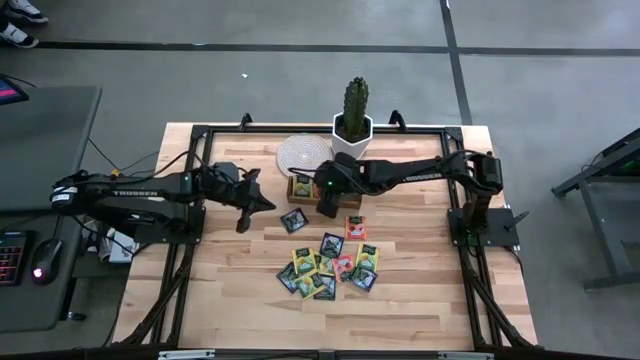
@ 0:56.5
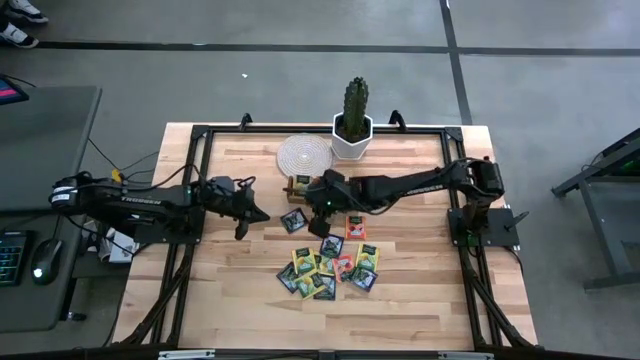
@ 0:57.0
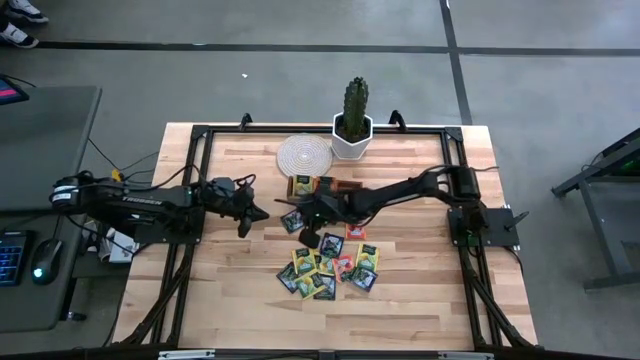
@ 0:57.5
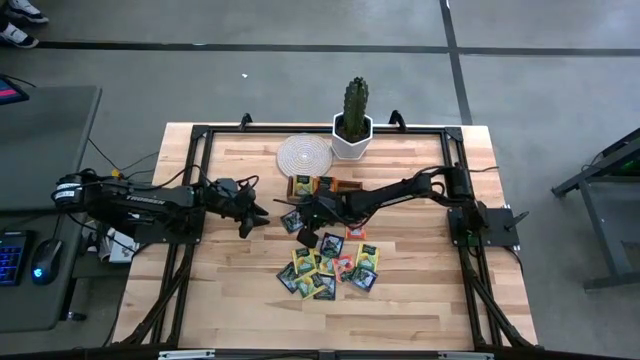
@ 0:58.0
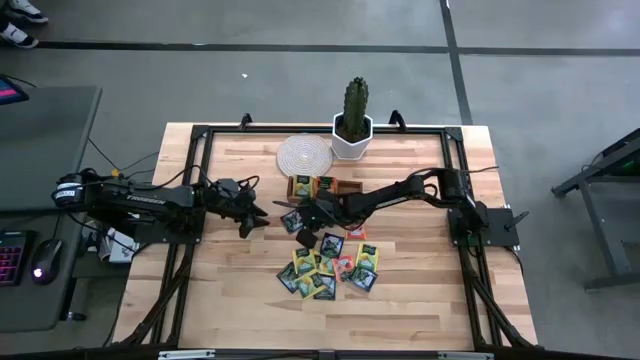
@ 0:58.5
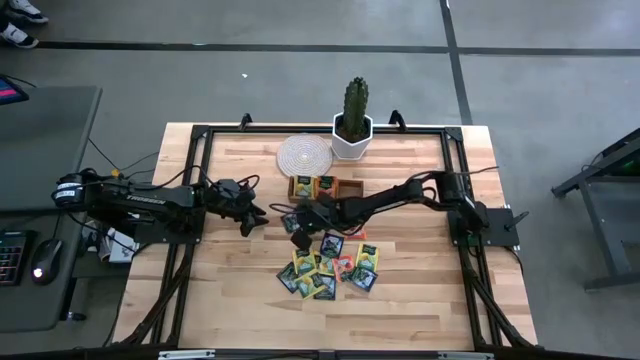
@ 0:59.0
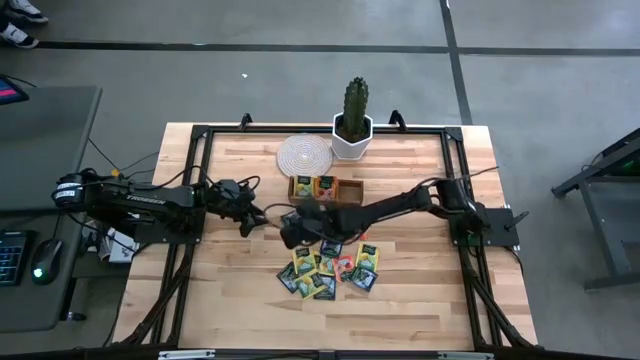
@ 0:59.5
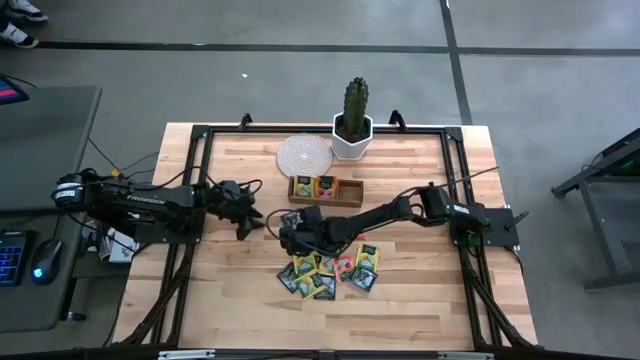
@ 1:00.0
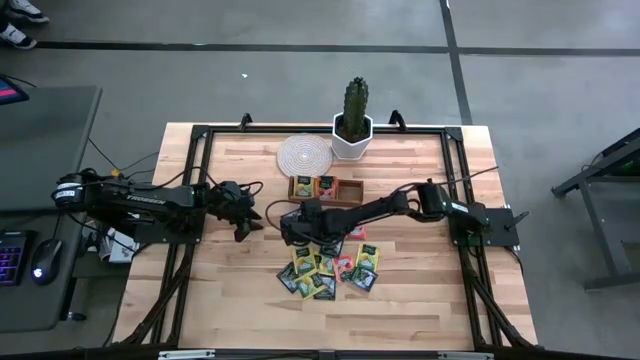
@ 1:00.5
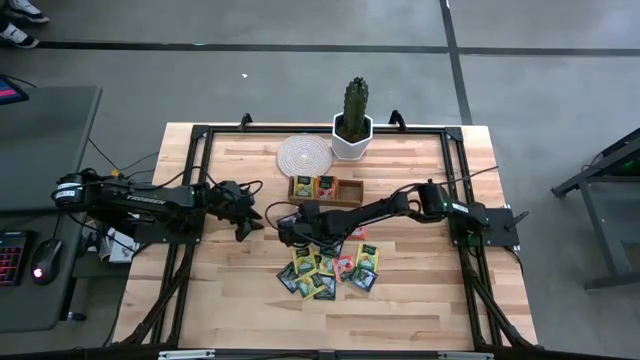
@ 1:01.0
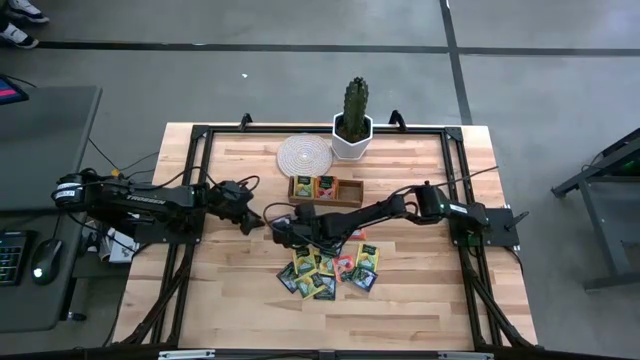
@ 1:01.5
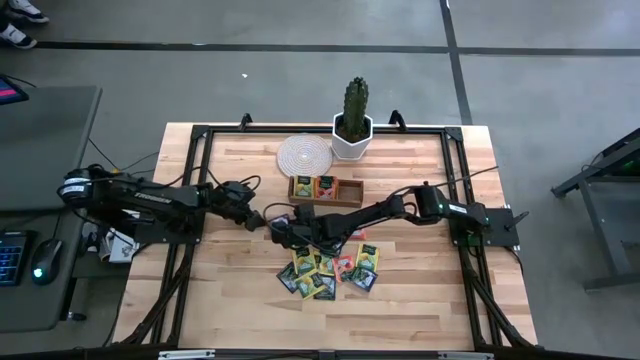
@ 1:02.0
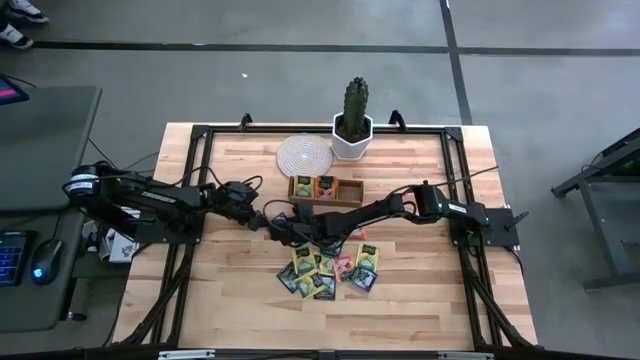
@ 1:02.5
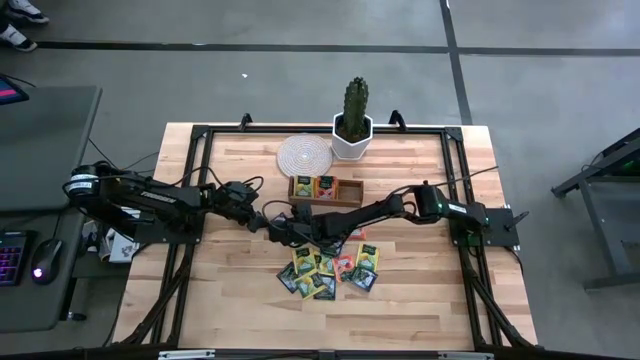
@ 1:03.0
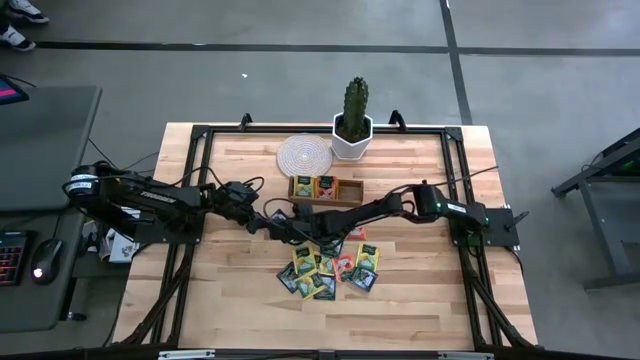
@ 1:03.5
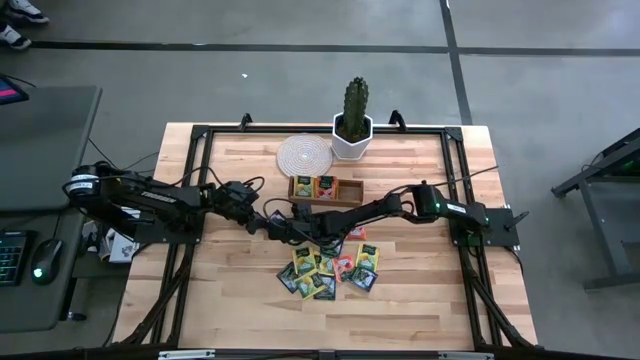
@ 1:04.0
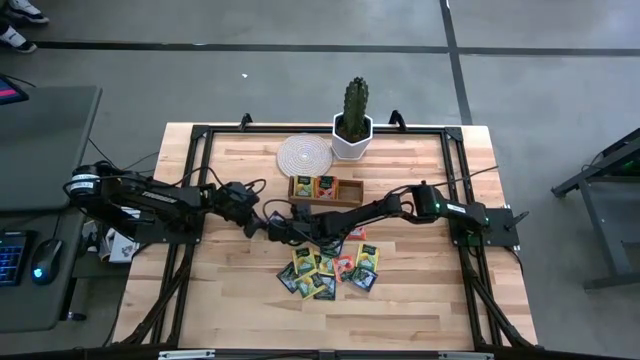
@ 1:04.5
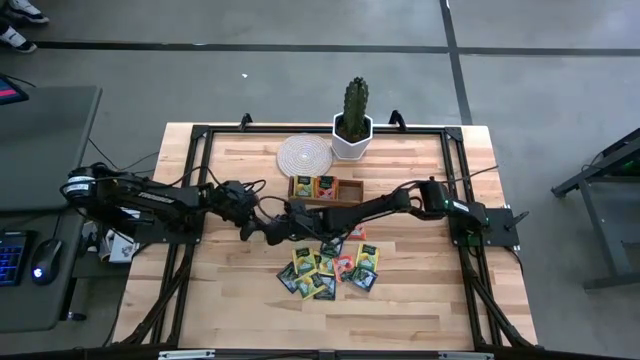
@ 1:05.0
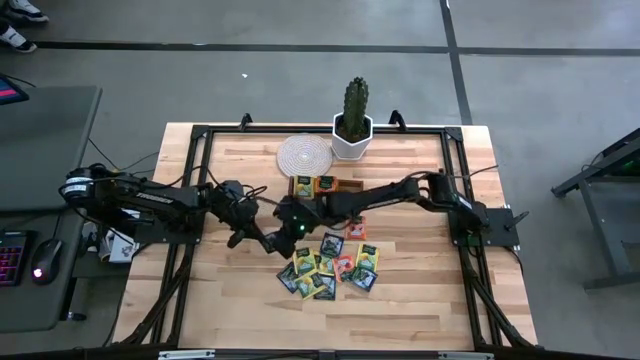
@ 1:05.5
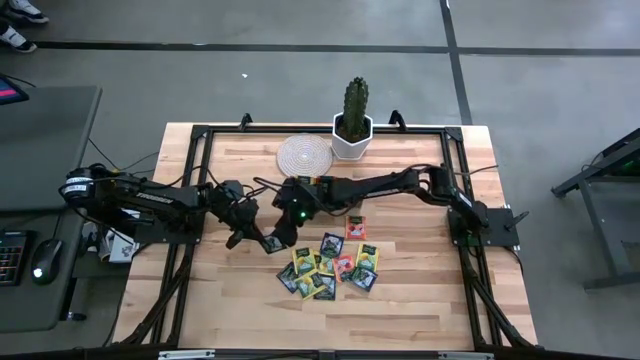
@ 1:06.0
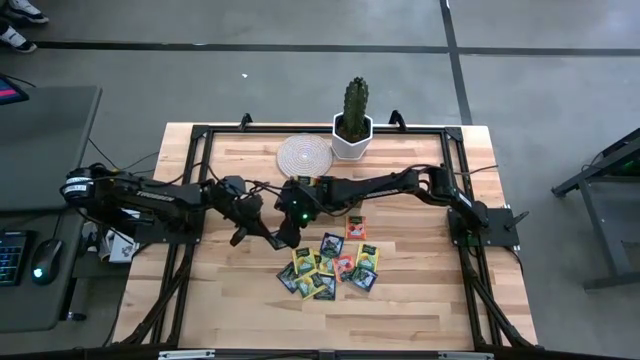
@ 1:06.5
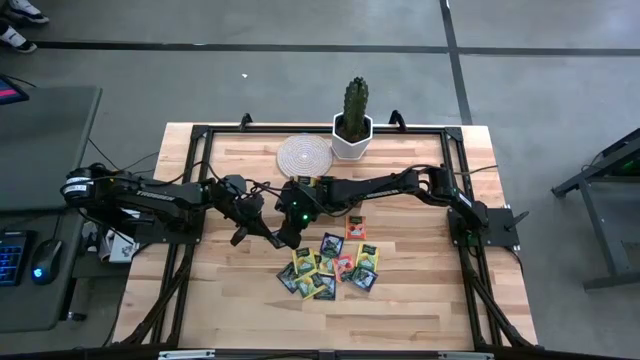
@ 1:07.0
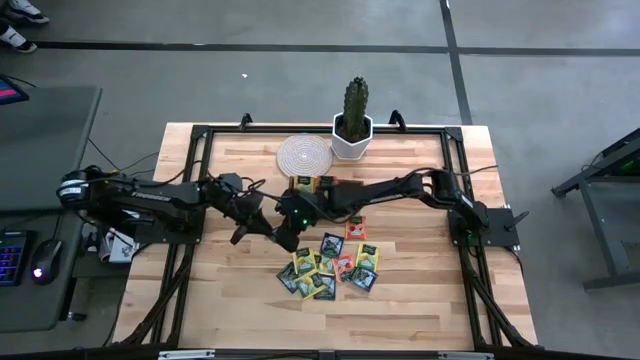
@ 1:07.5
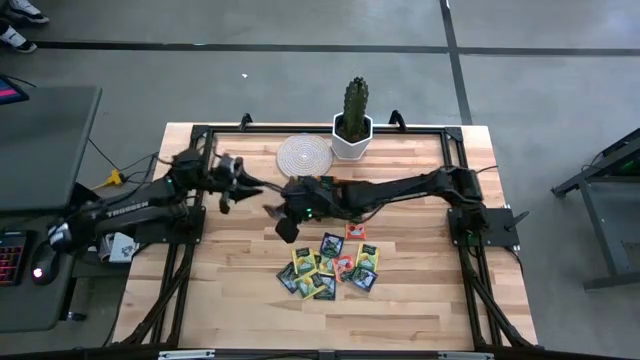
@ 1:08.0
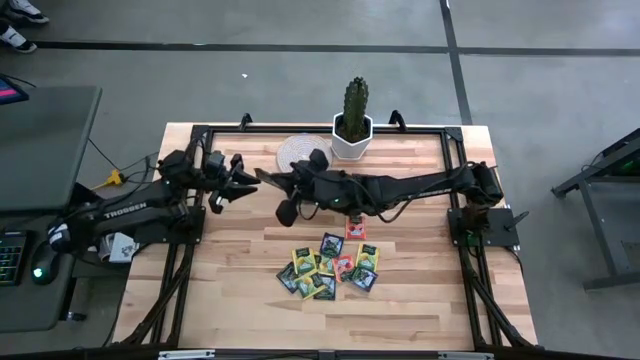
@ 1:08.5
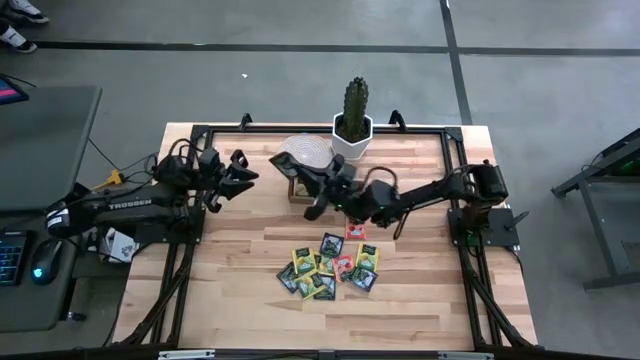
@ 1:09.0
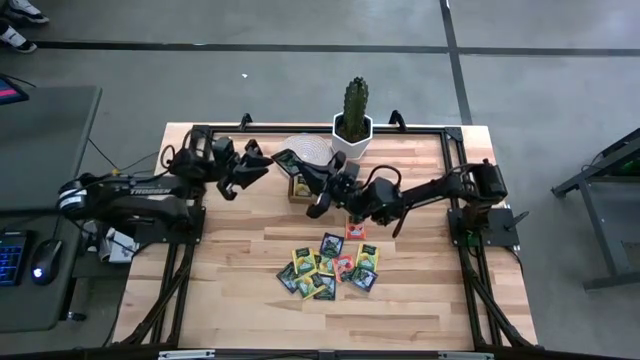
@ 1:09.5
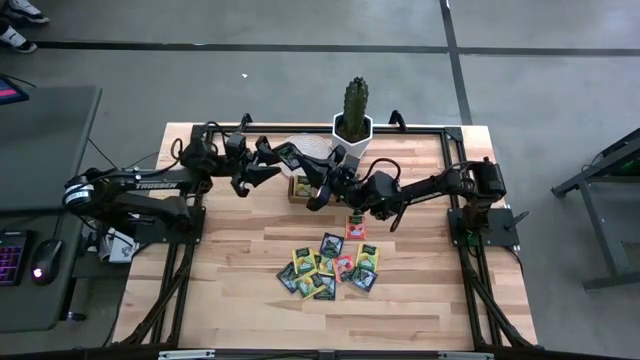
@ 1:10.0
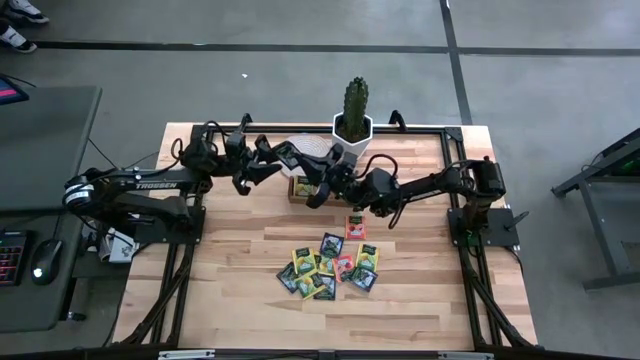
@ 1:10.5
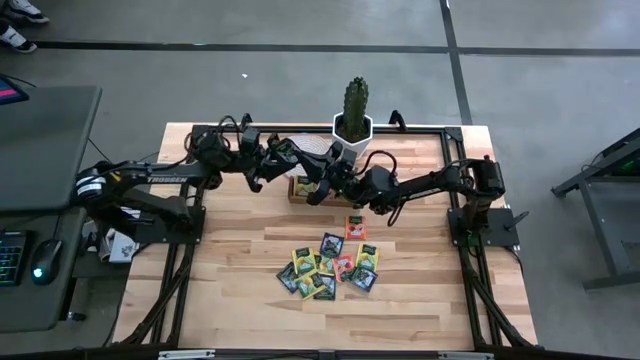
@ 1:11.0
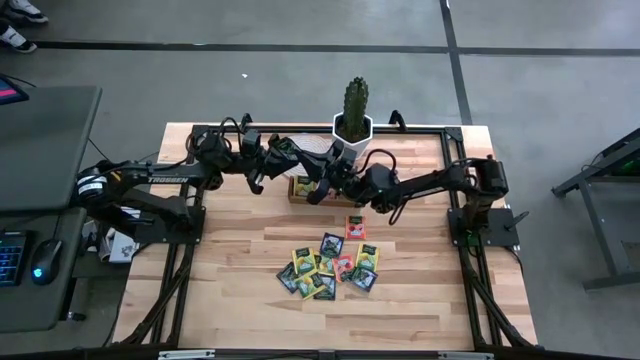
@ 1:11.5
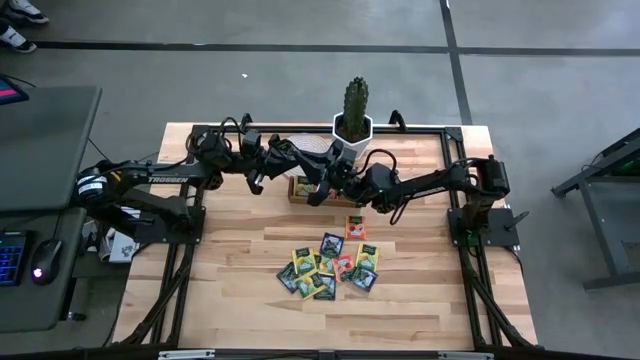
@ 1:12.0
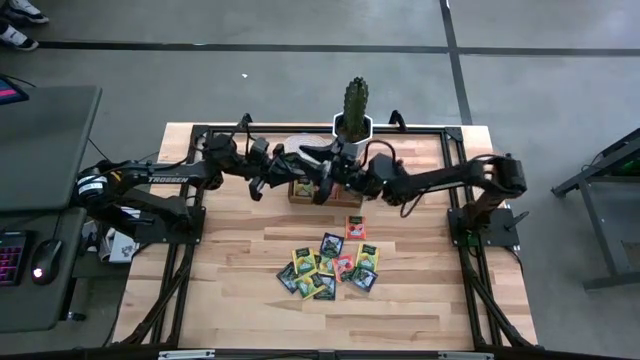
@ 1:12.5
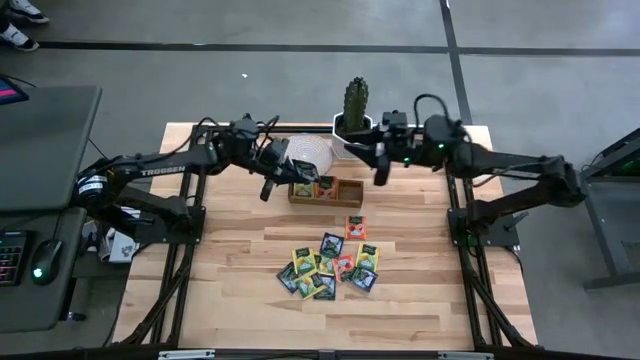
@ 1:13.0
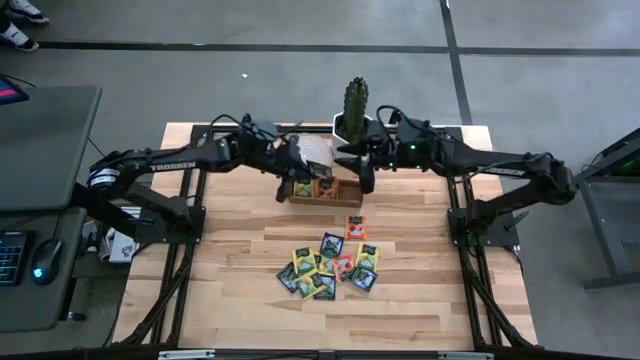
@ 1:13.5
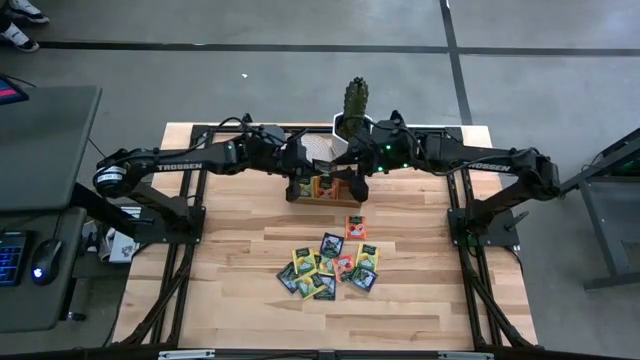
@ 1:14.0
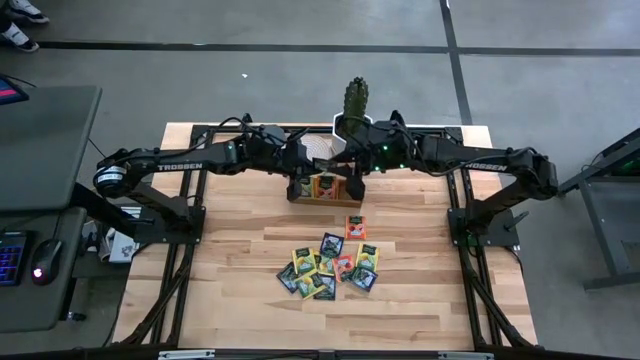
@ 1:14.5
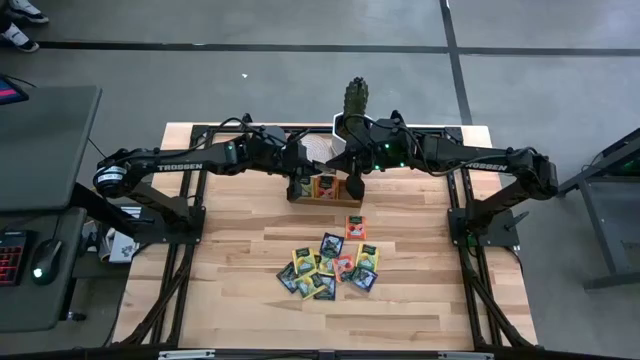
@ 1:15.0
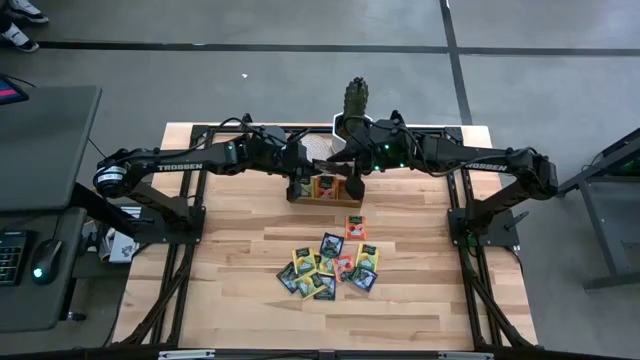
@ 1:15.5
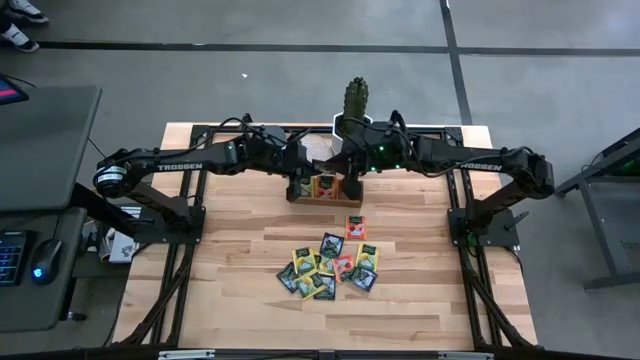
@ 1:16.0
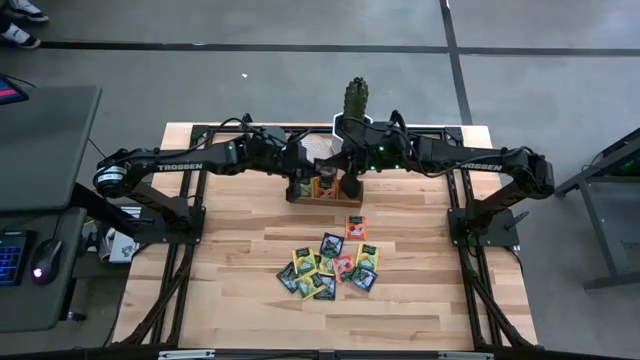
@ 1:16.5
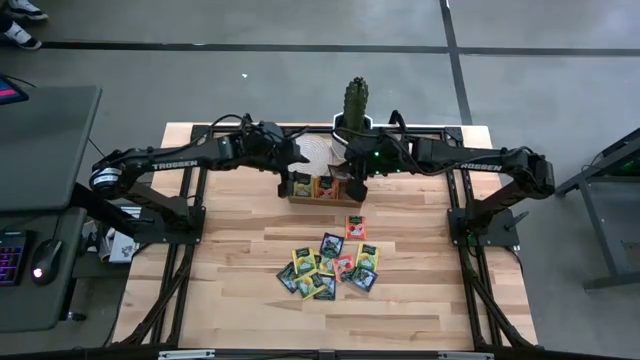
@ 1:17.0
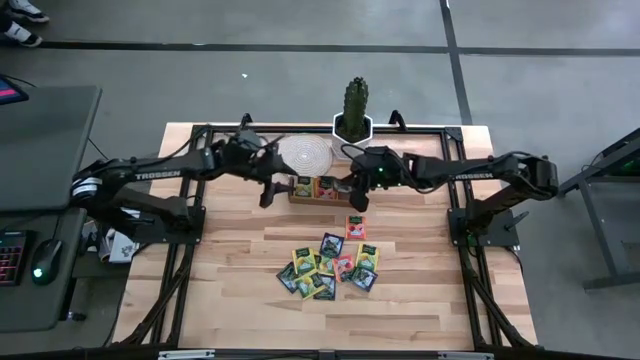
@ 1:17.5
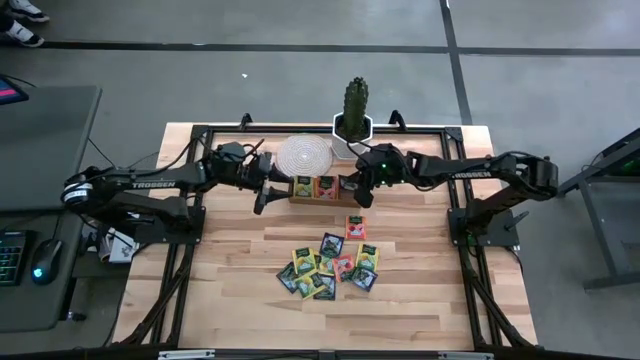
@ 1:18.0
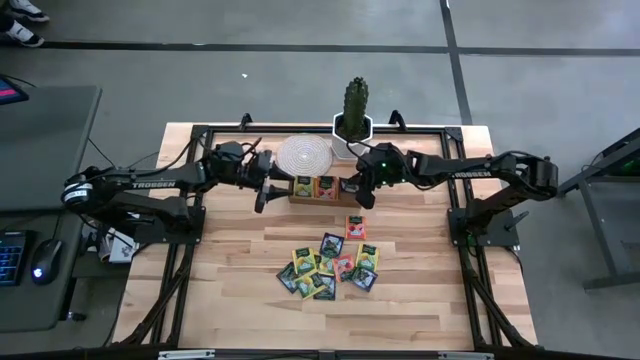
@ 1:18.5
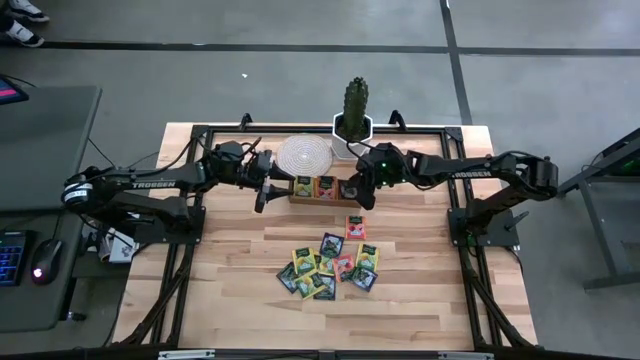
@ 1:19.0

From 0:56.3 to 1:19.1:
Task: Pick & Place Tea
Put the purple tea bag into the right section of the wooden organizer
